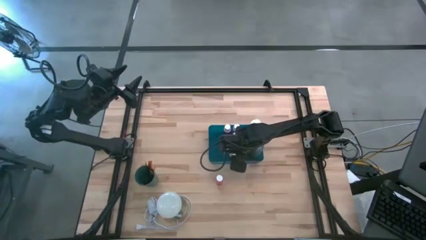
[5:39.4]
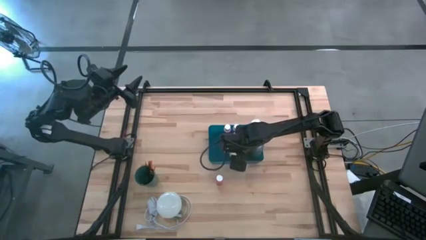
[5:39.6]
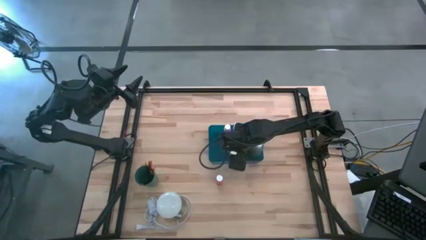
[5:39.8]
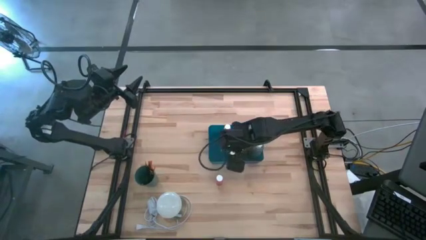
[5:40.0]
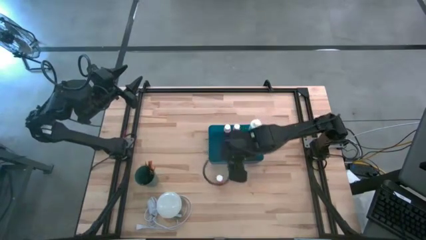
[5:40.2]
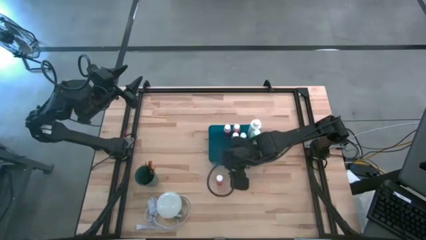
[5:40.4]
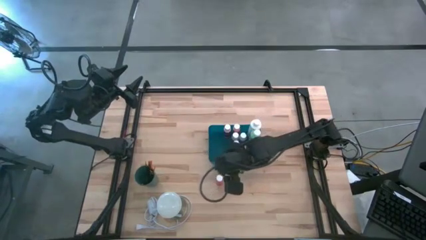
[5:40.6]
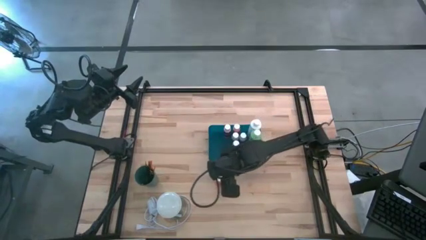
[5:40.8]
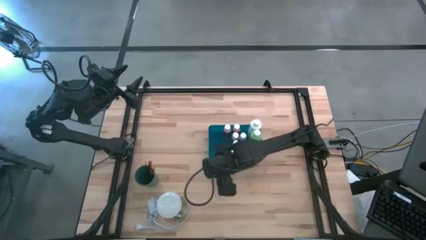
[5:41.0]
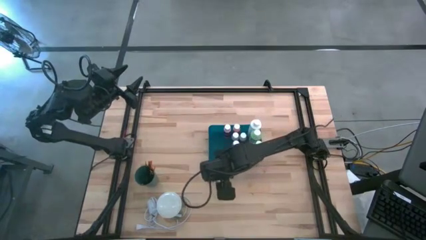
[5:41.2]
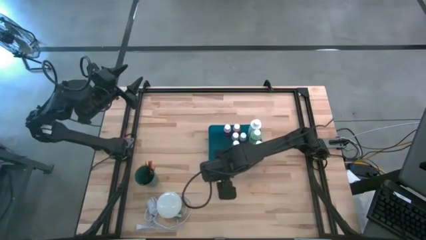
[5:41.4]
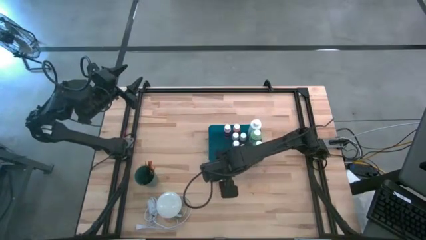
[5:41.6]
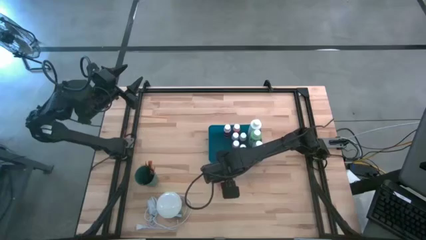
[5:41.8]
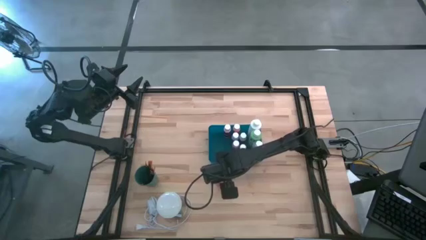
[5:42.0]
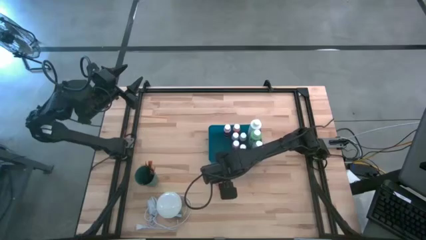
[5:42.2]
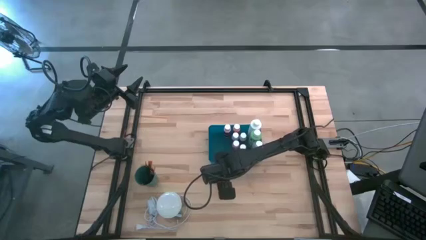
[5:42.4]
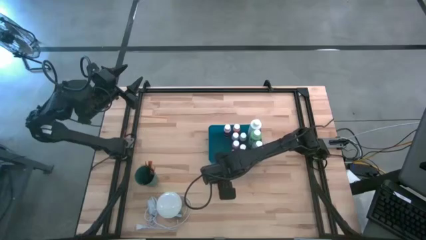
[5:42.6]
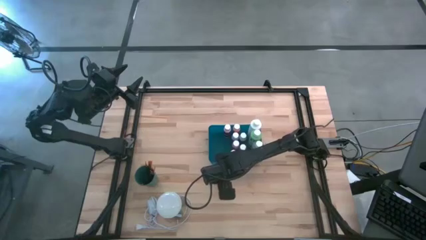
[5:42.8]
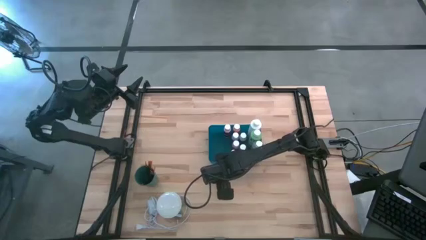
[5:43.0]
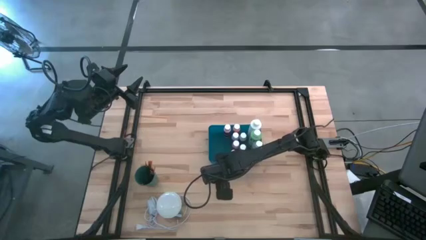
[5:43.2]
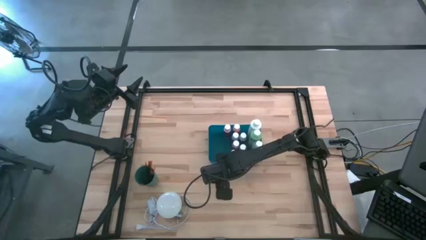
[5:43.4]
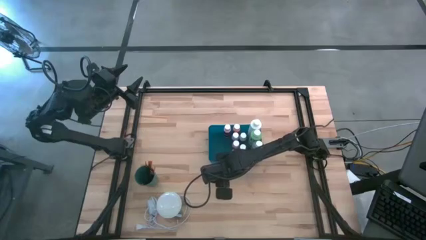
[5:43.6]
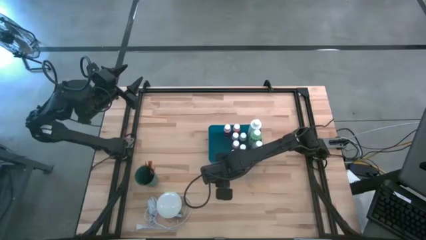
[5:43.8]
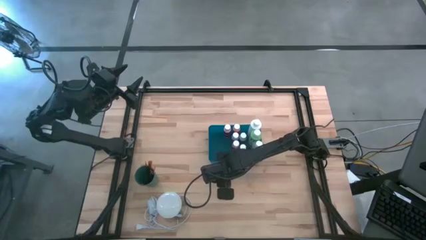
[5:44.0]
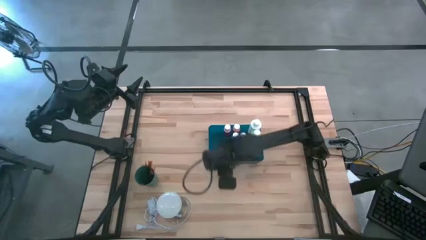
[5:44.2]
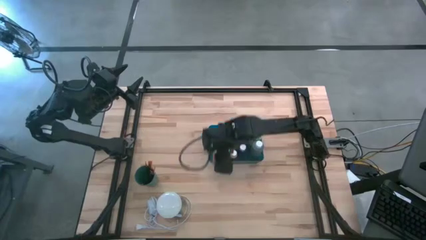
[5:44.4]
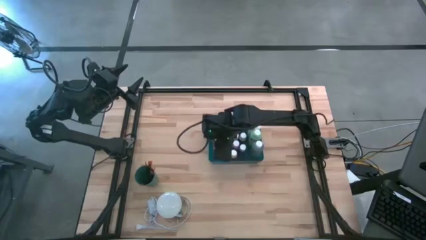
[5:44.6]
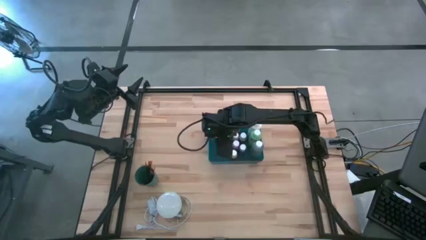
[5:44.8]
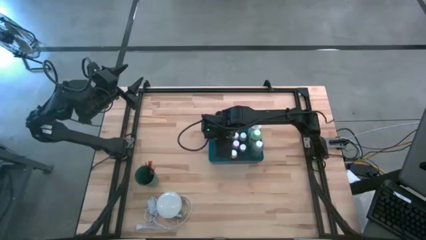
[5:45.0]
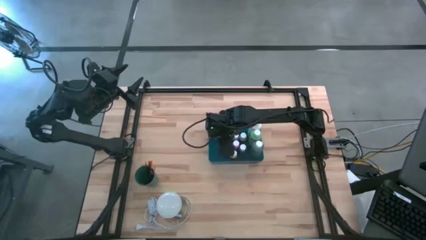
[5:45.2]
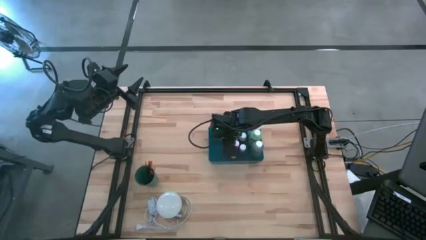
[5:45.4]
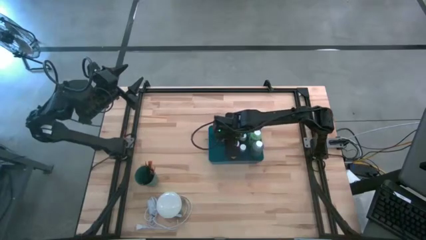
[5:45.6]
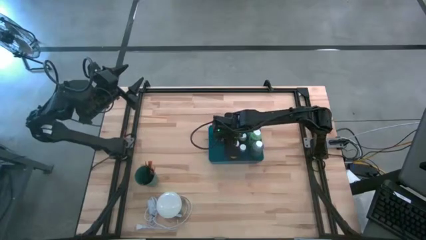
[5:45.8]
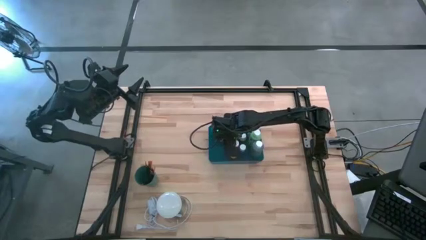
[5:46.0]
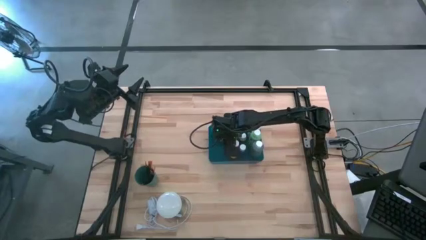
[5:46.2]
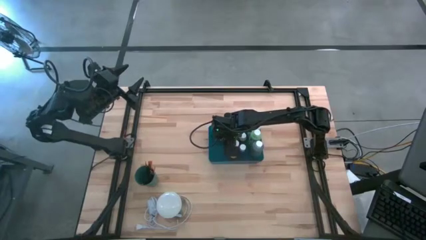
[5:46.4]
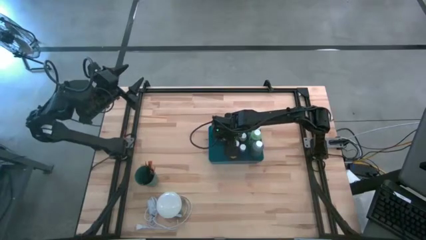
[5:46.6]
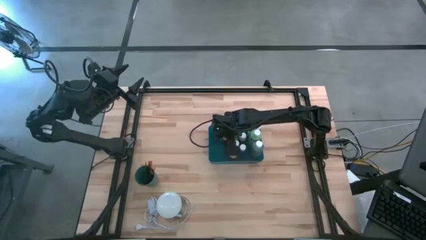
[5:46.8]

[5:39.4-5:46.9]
Task: Pick & Place Paint Supplies
Put the orange paint bottle into the blue bin

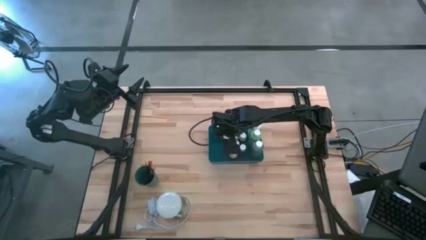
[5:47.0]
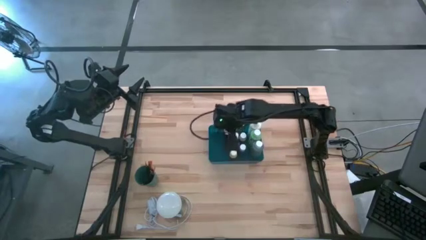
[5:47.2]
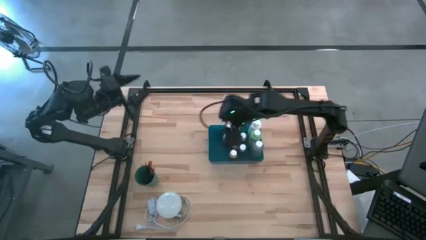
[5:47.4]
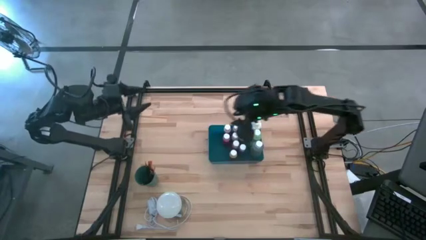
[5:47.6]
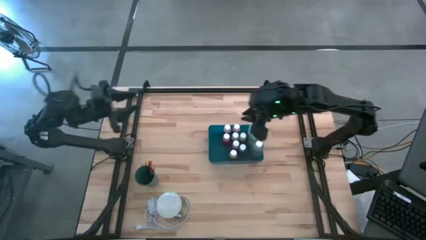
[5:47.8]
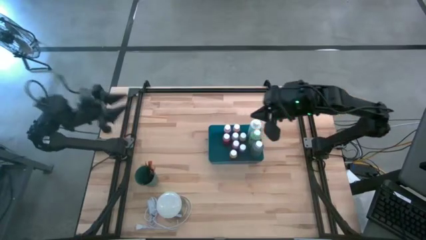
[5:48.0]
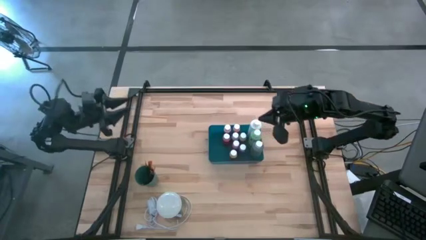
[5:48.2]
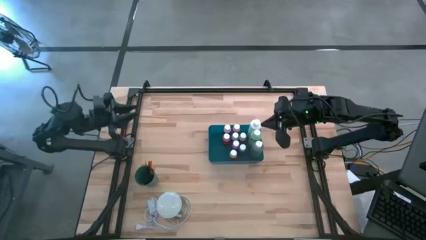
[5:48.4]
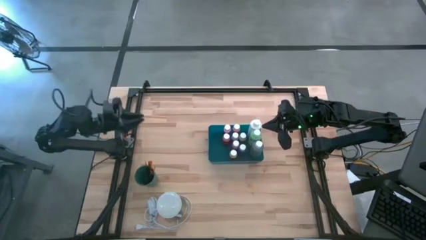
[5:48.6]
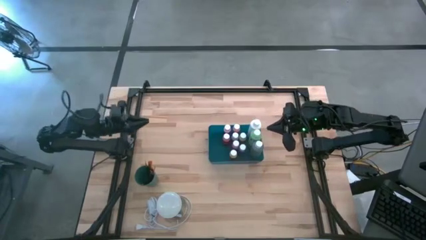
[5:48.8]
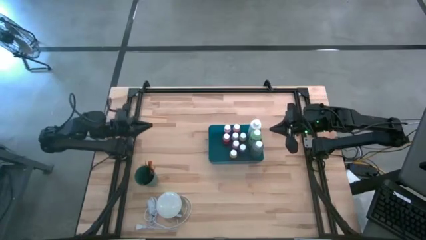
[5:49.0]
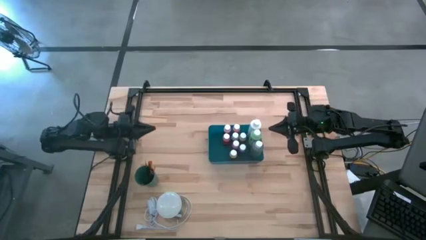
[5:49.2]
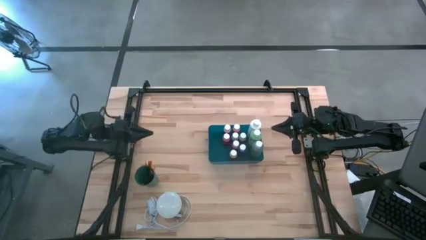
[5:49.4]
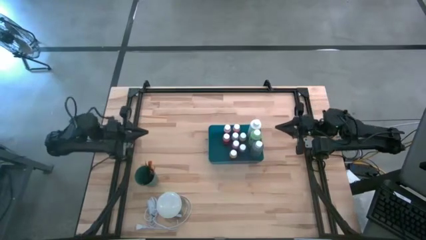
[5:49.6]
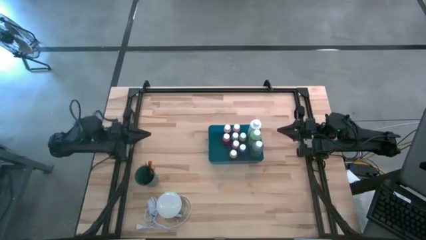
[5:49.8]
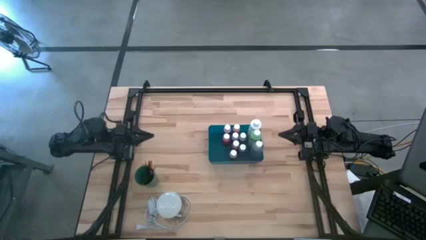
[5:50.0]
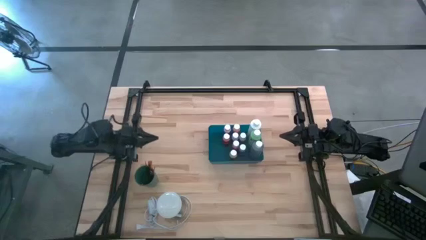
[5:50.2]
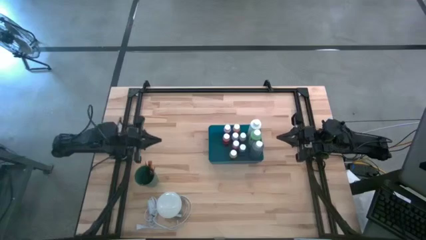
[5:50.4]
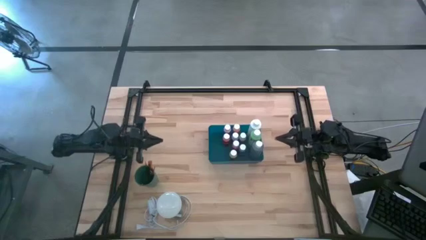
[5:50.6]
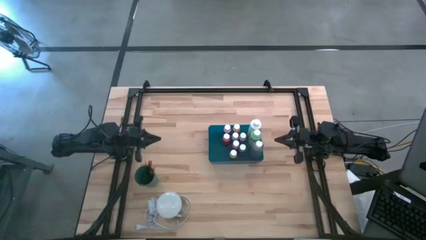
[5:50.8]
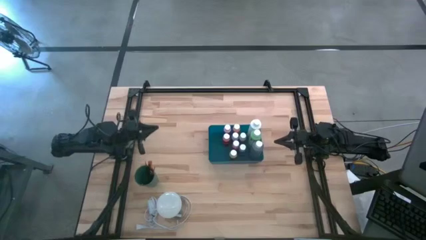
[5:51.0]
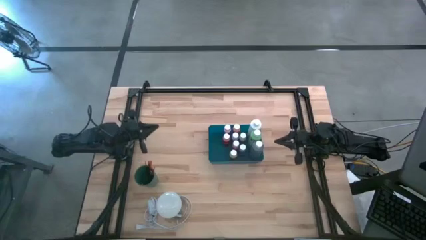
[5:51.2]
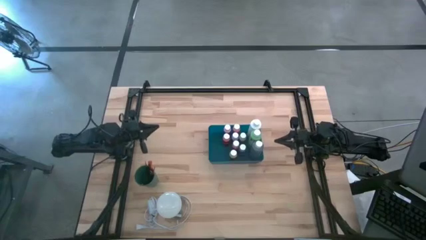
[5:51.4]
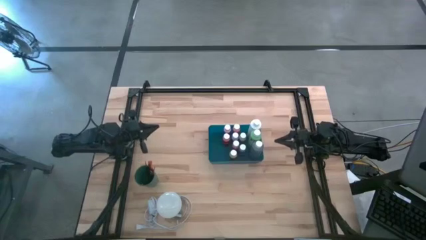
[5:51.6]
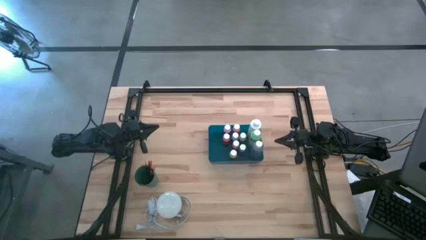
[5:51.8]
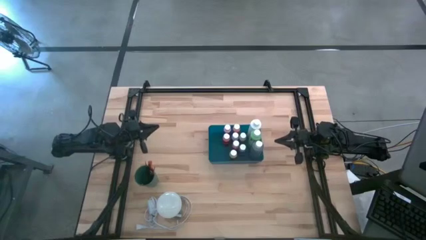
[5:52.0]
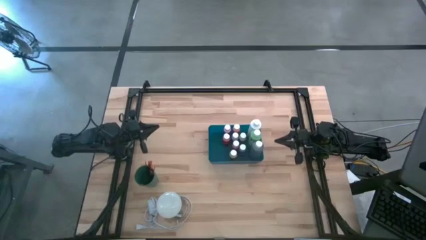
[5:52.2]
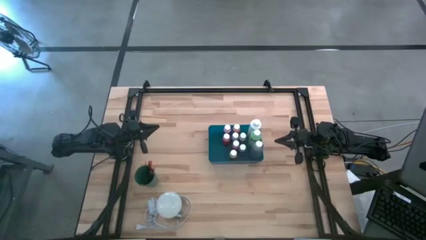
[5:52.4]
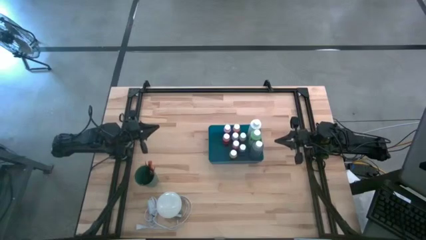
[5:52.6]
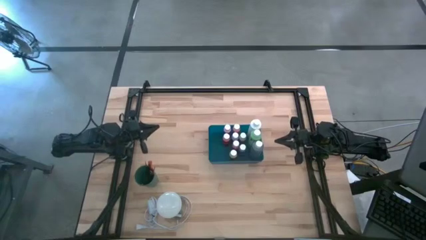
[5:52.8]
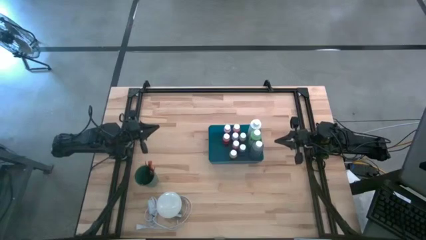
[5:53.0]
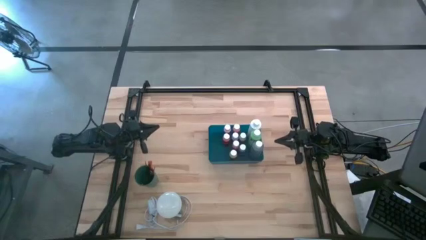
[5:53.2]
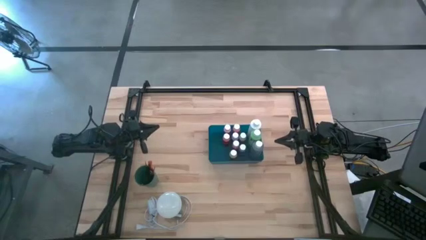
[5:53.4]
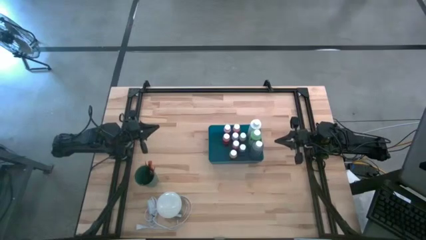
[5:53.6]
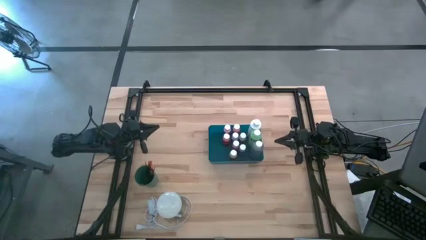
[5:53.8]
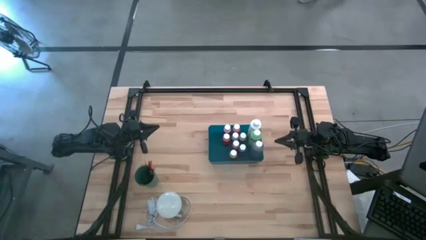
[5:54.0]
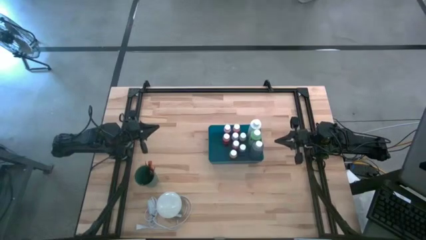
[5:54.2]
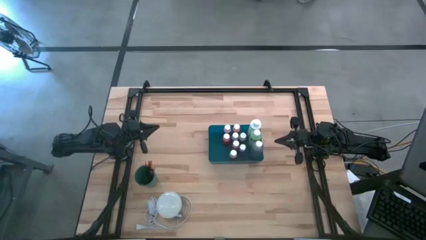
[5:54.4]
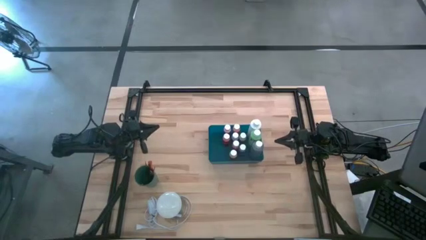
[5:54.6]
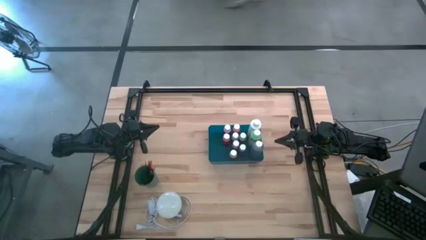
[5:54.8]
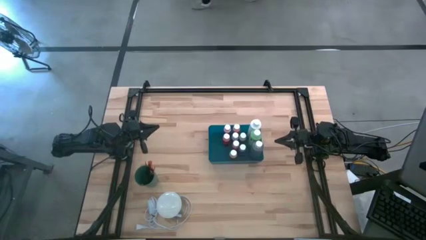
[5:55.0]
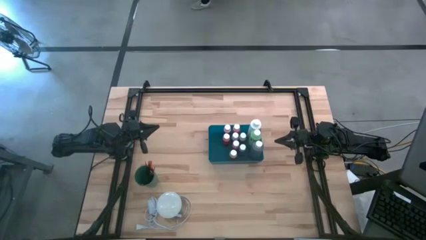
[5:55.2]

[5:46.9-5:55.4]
Return to Home Position

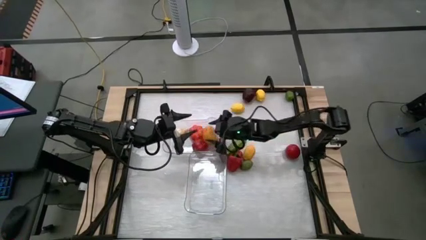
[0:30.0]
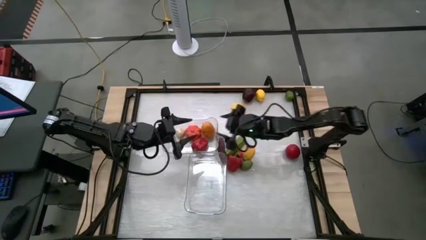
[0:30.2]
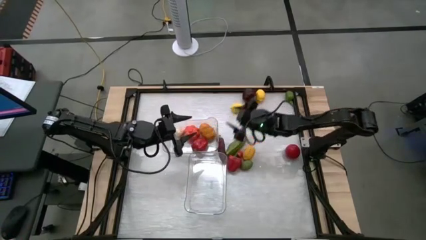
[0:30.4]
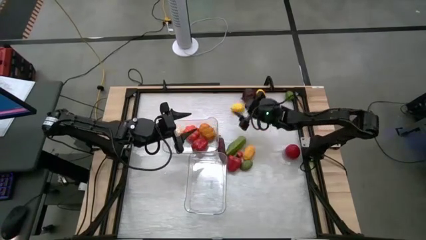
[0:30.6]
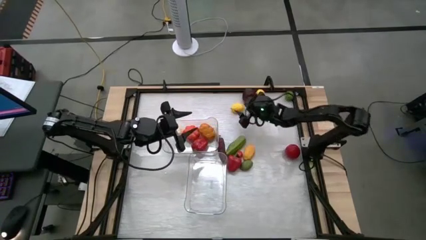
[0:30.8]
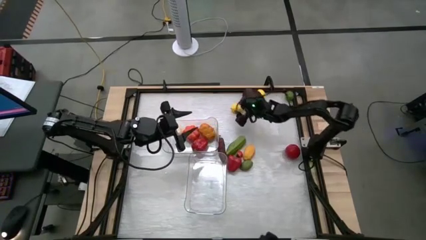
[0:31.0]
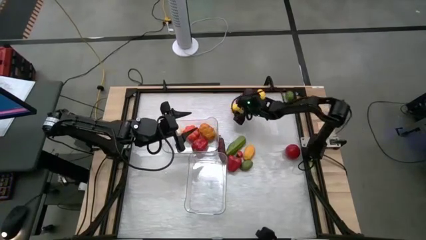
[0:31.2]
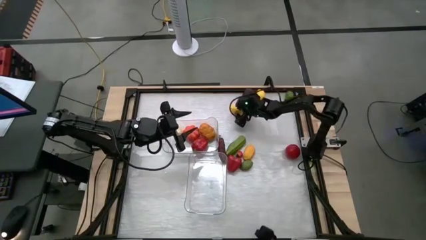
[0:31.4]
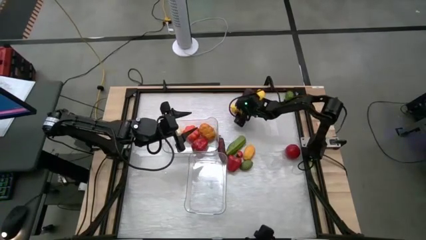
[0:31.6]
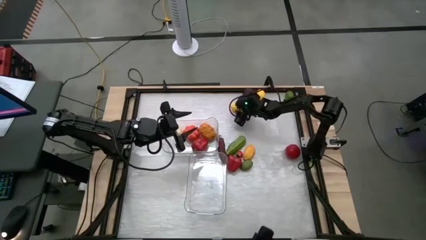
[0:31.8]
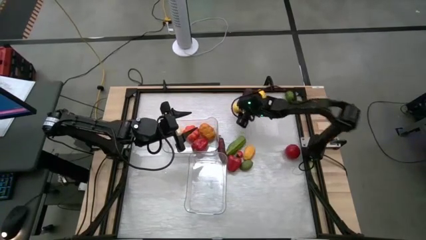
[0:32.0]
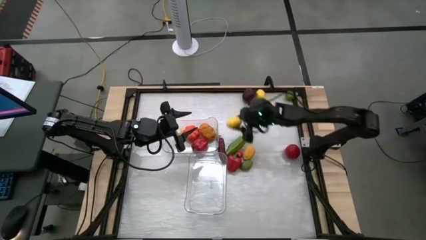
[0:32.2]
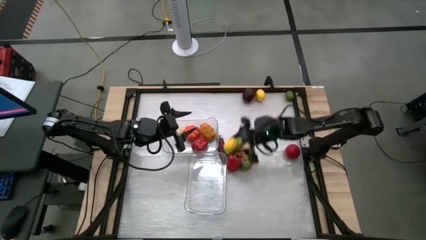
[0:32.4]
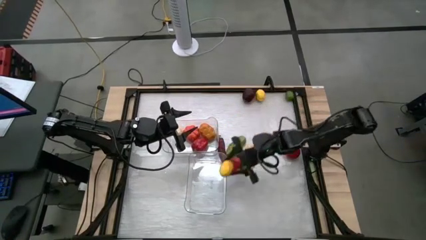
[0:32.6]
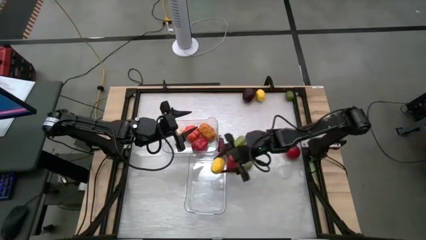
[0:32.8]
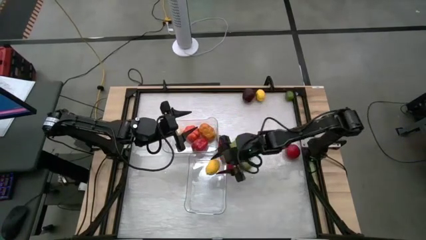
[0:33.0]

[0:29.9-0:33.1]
Task: Sort produce into baskets
Put the middle lemon into the bottom transparent bin
